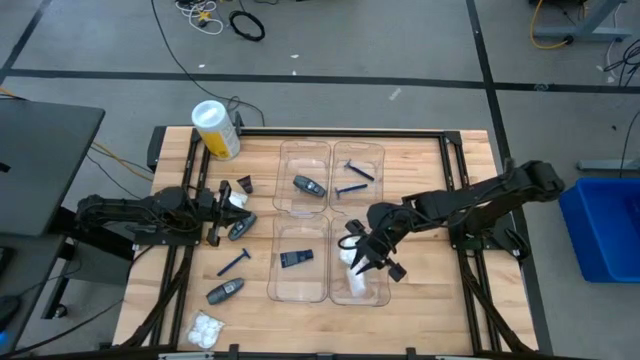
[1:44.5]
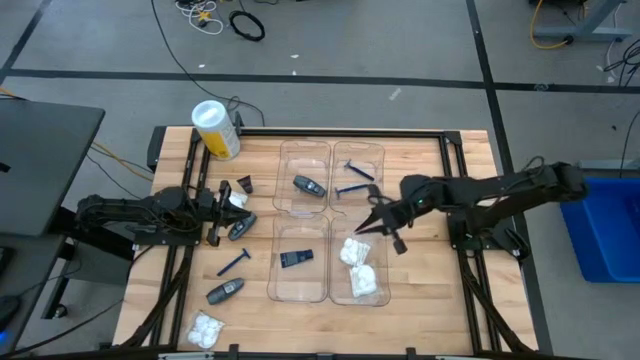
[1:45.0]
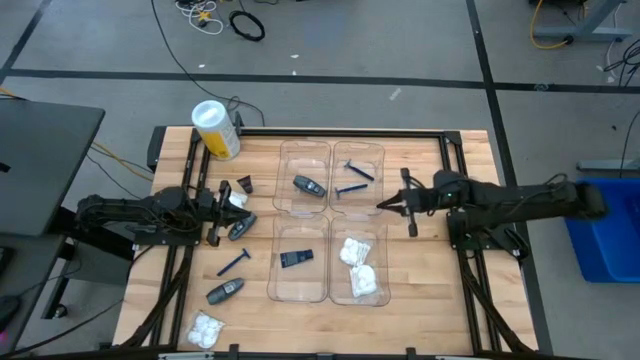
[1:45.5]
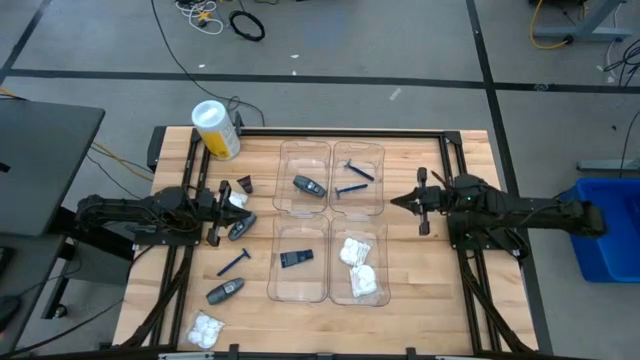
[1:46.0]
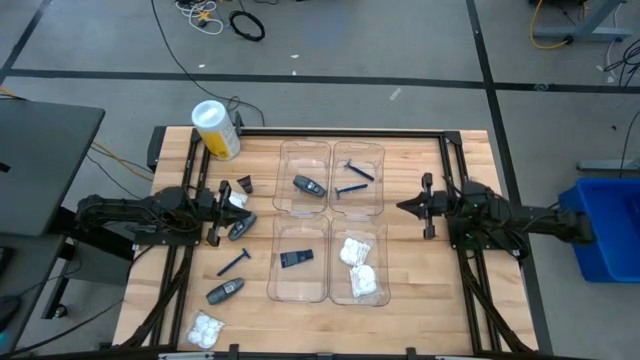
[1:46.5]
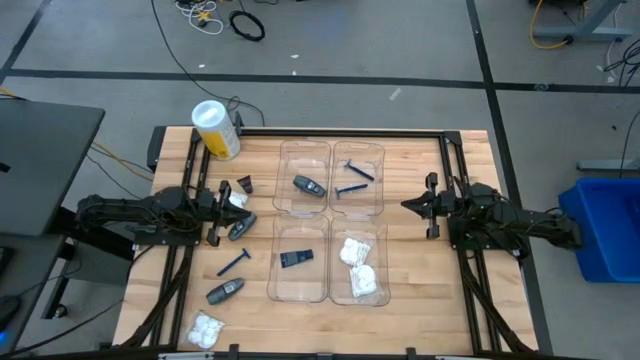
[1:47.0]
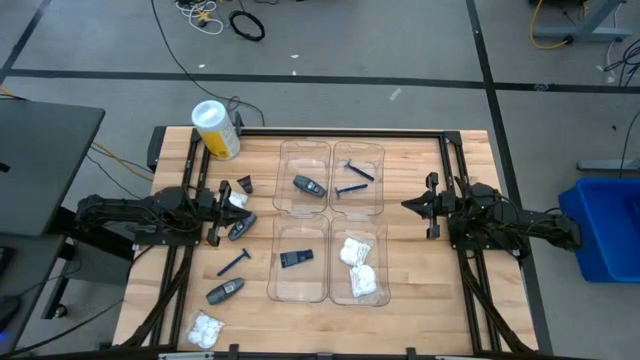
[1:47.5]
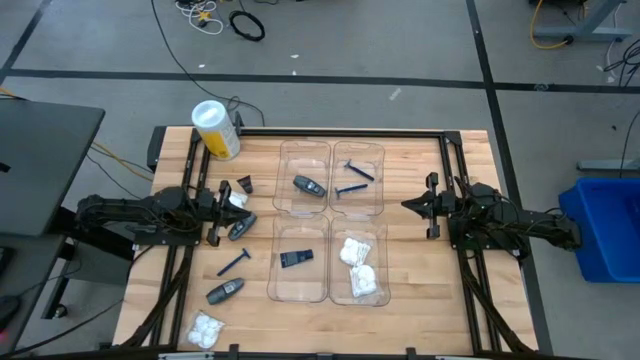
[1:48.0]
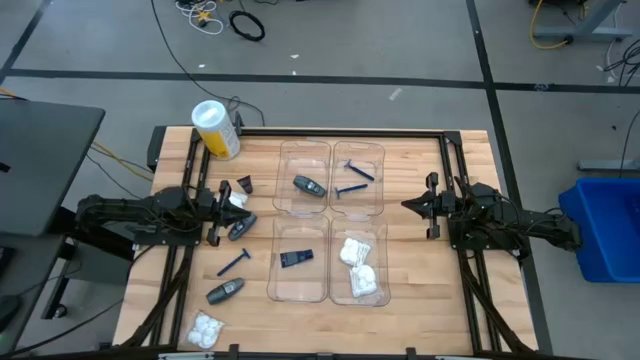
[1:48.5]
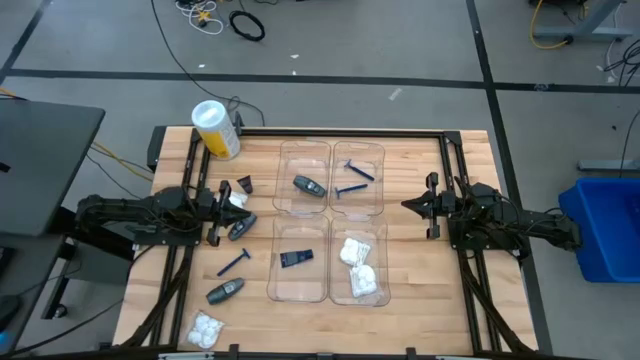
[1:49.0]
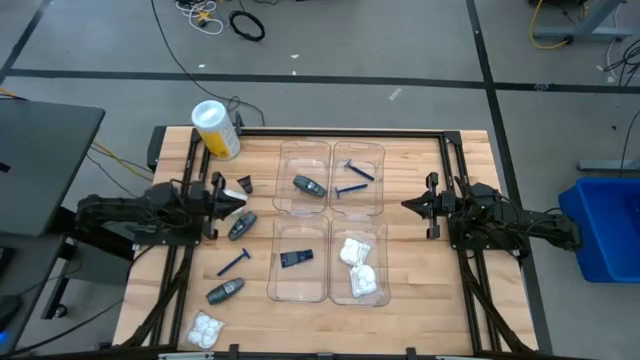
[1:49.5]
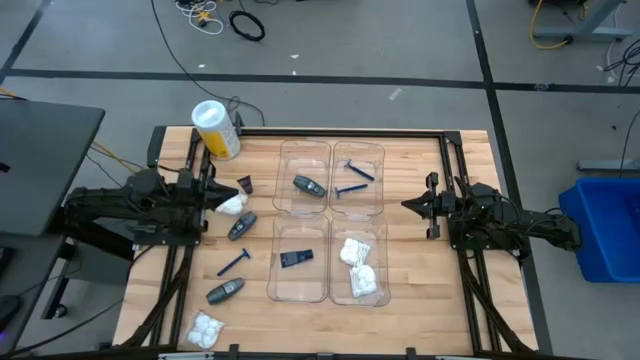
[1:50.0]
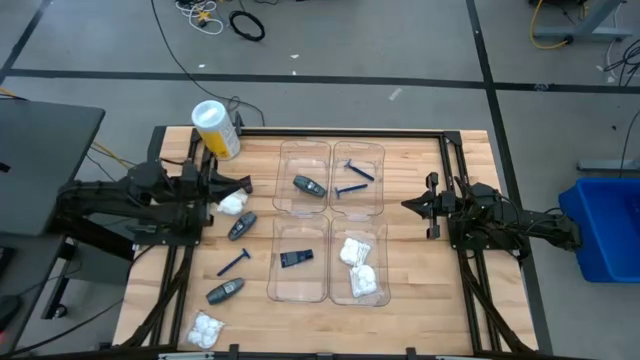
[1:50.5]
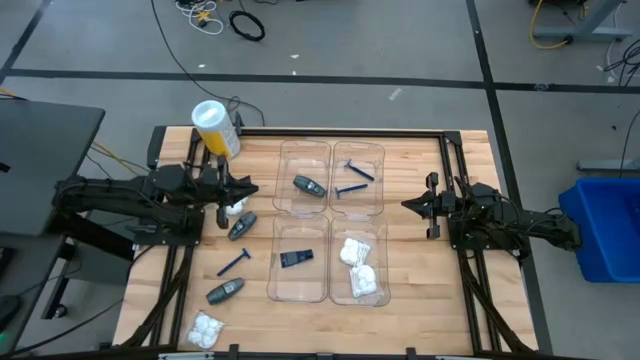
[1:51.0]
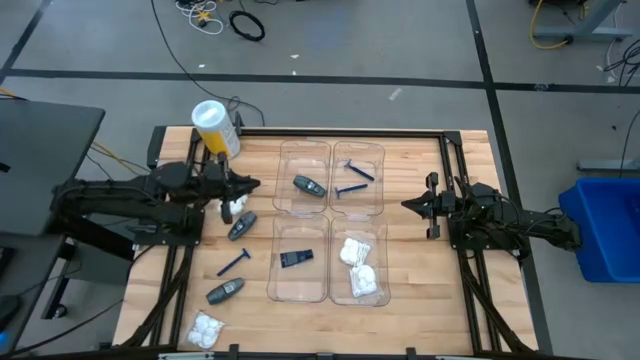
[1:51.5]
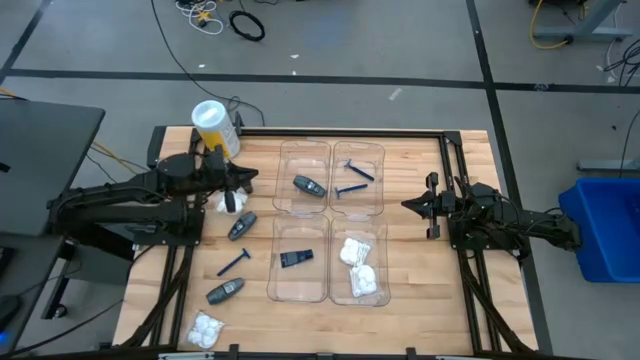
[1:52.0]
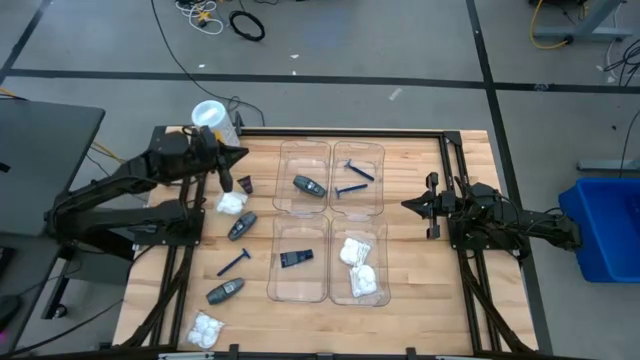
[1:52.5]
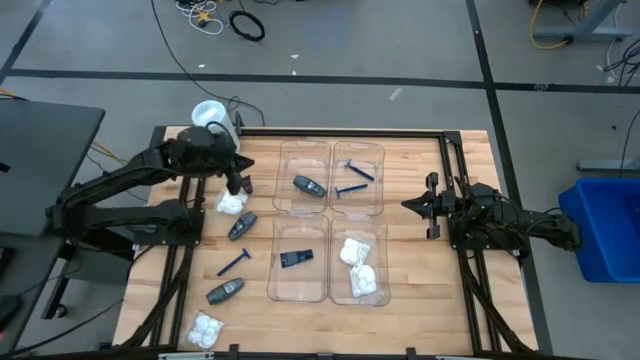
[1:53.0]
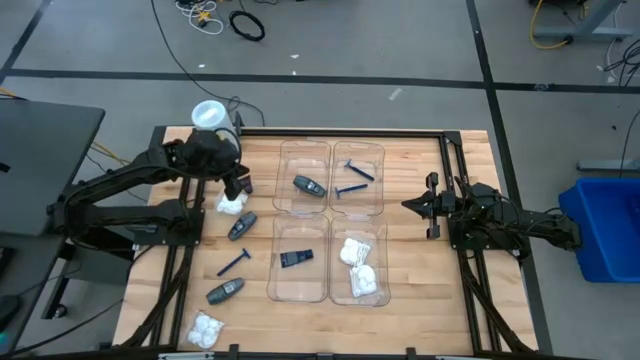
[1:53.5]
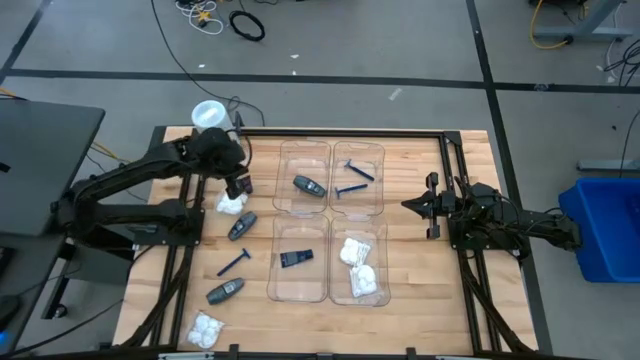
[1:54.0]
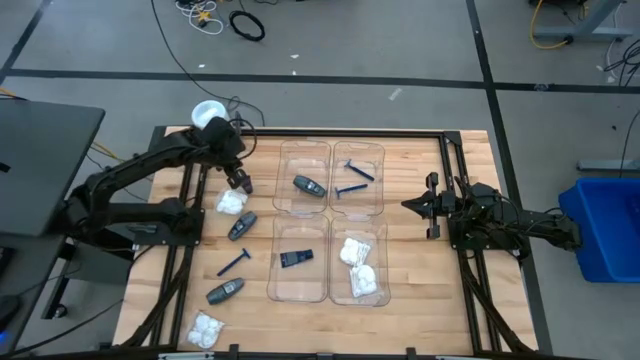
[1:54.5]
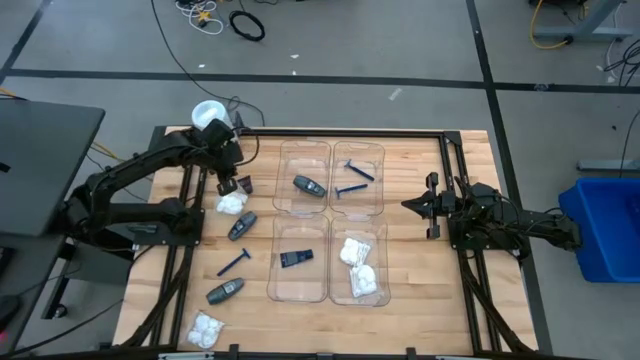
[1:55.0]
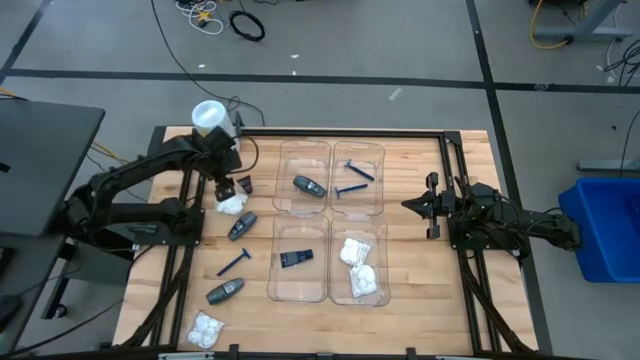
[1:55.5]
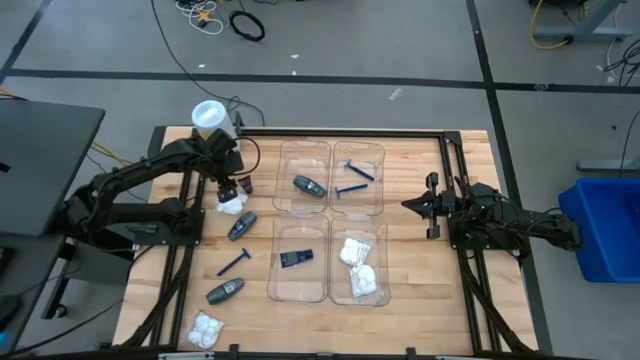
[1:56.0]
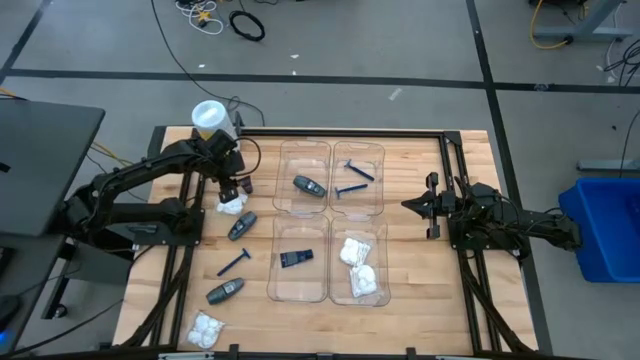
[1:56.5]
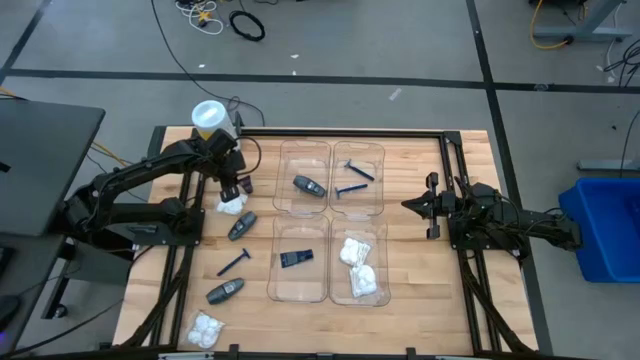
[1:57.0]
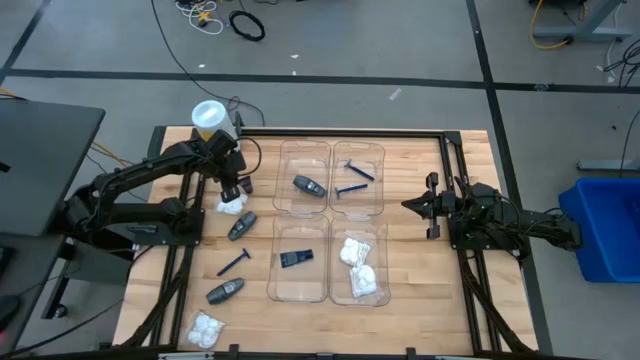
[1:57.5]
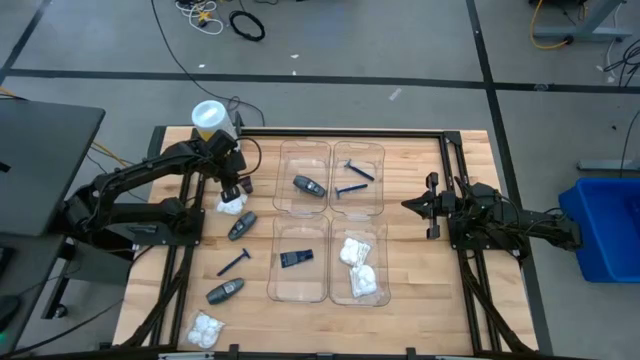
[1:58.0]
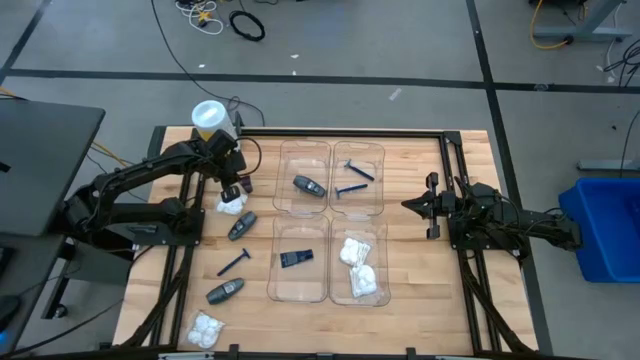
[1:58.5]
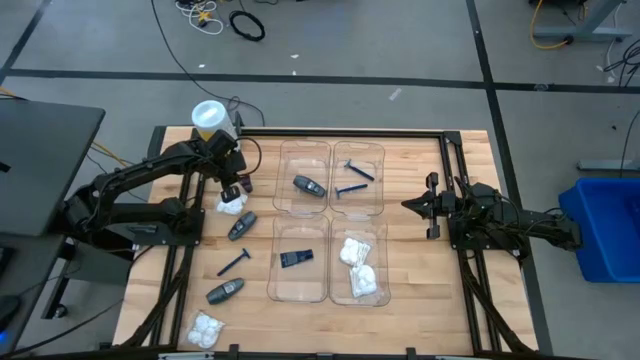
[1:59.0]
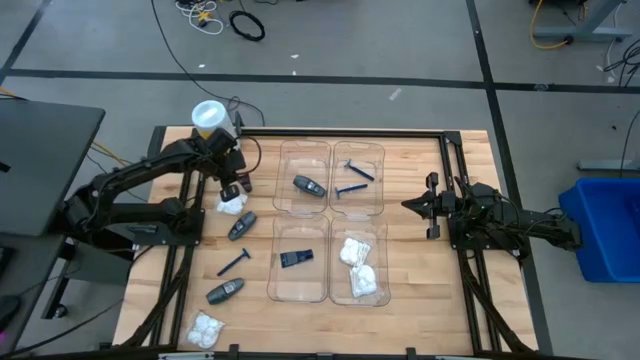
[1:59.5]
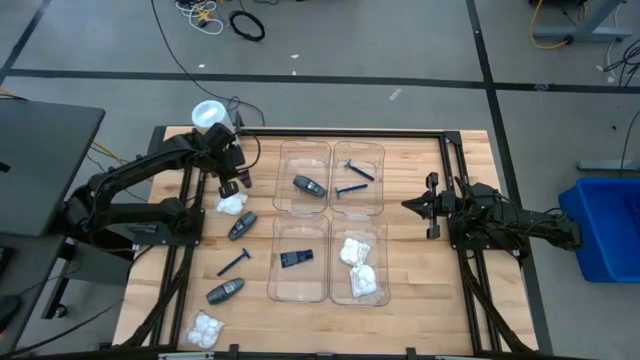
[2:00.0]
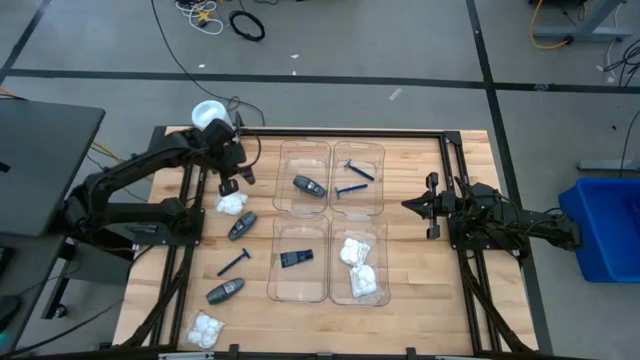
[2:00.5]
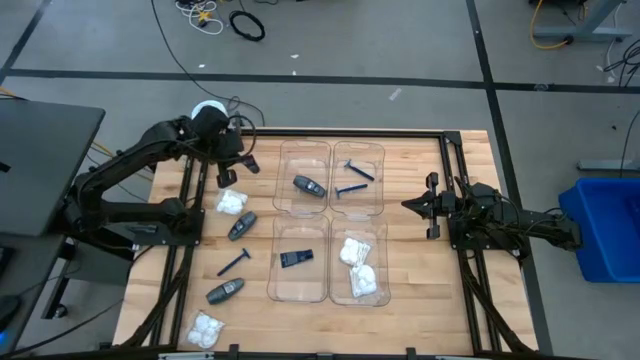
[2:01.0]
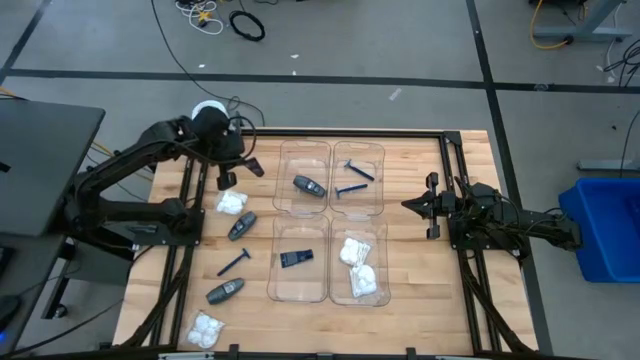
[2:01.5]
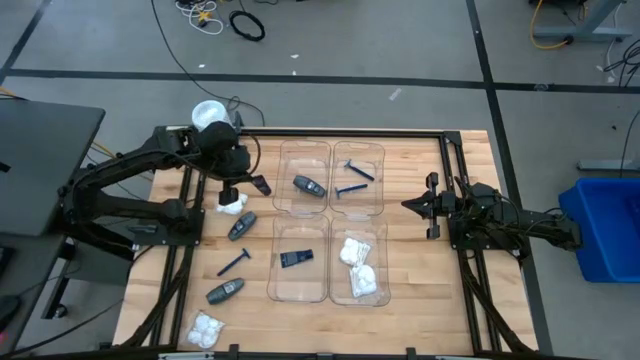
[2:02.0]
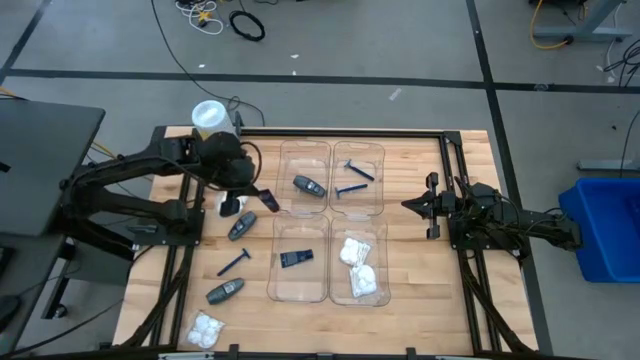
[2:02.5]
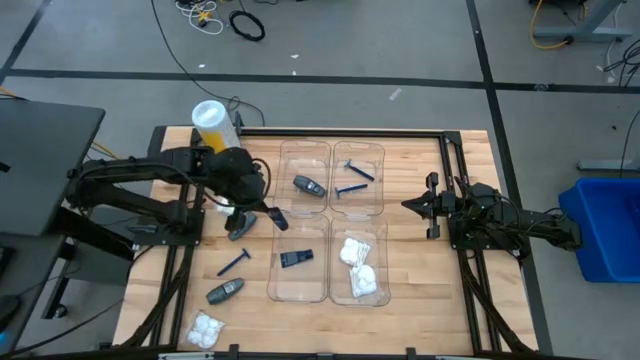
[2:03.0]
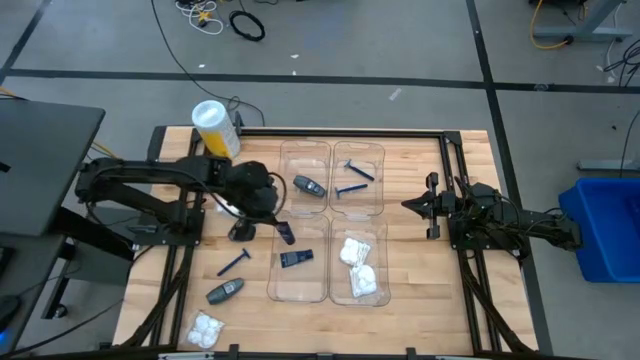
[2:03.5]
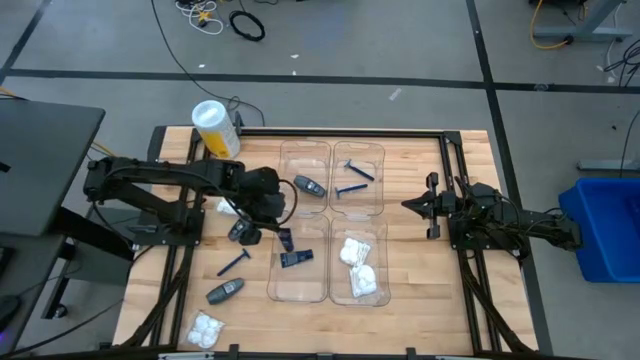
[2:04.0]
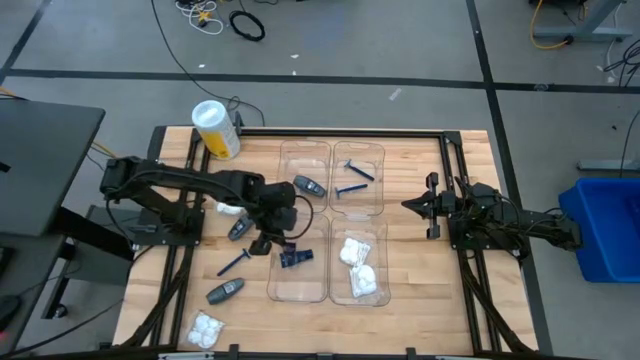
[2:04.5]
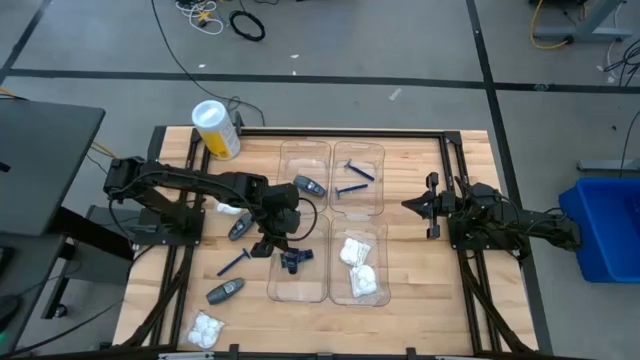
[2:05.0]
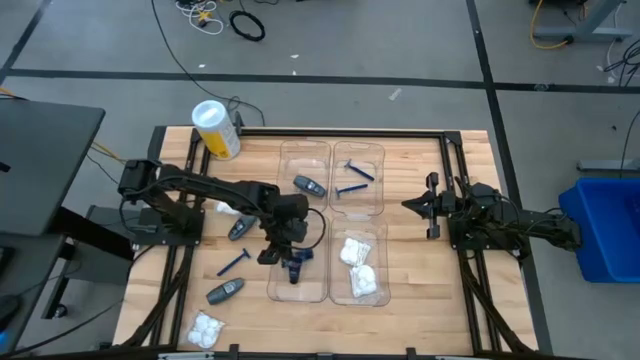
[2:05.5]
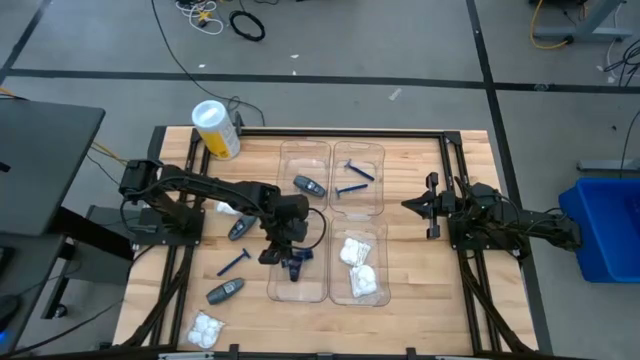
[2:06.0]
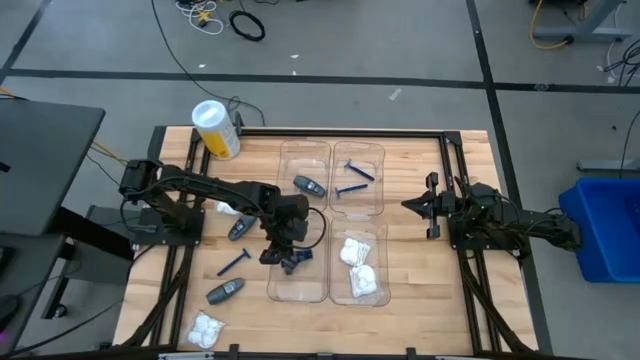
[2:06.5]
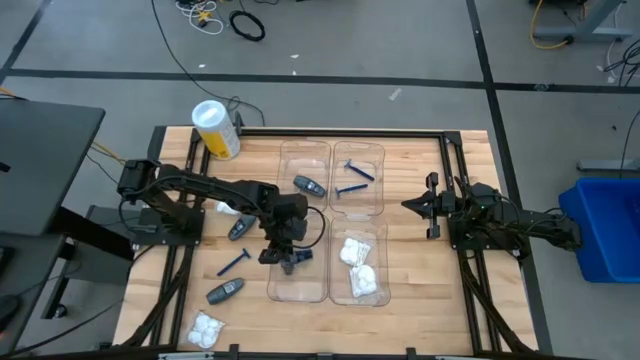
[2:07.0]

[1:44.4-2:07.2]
Task: Pick & Place Travel size toiletries
Put the shave cream into the bottom left transparent bin
